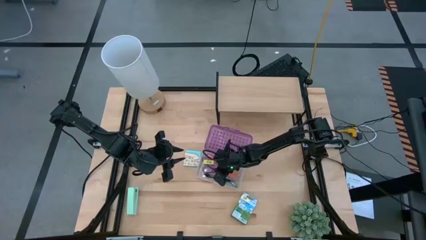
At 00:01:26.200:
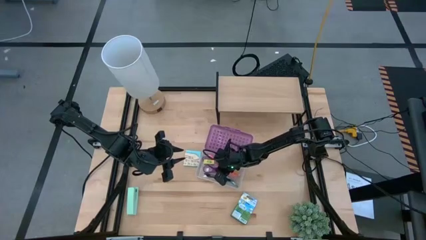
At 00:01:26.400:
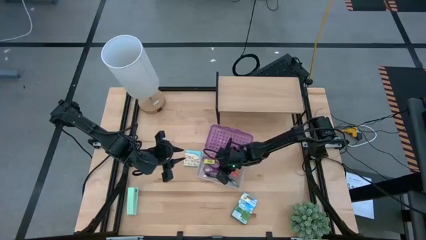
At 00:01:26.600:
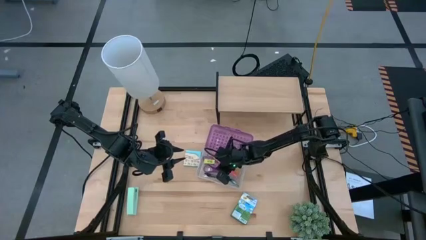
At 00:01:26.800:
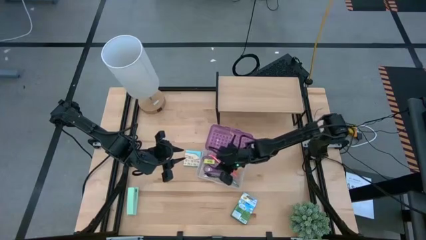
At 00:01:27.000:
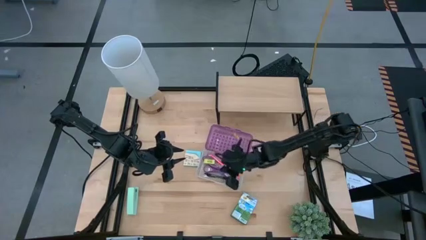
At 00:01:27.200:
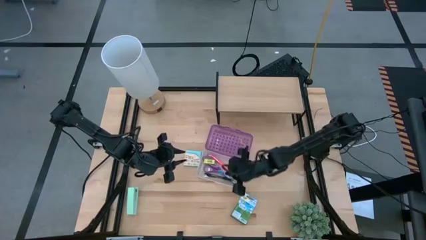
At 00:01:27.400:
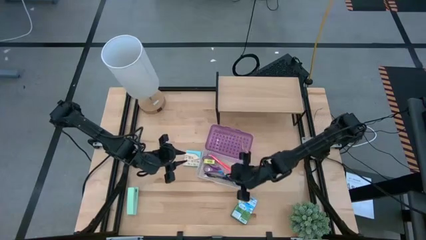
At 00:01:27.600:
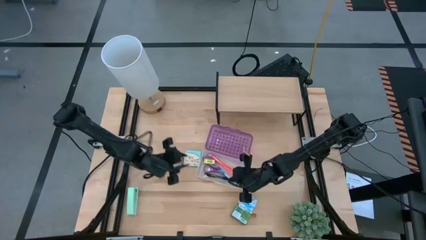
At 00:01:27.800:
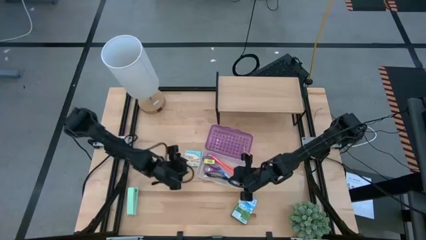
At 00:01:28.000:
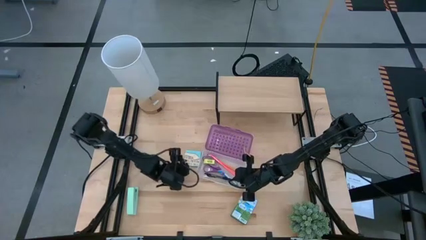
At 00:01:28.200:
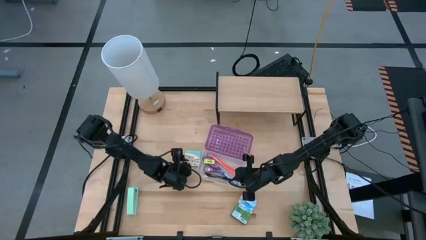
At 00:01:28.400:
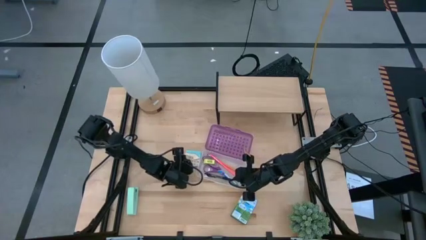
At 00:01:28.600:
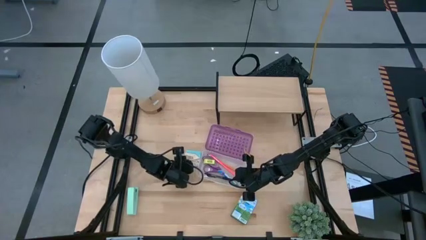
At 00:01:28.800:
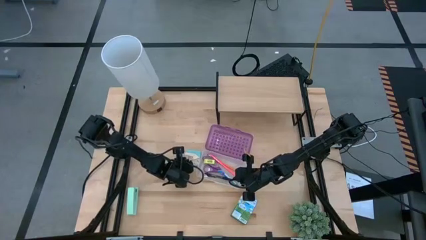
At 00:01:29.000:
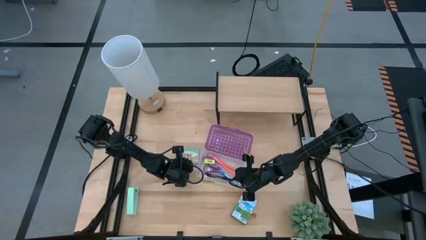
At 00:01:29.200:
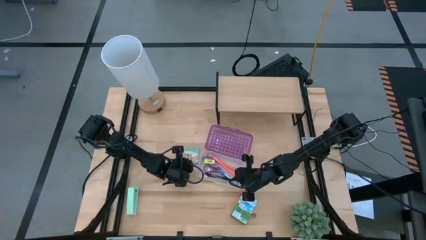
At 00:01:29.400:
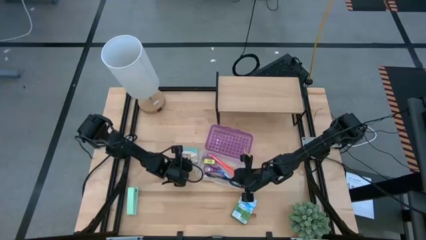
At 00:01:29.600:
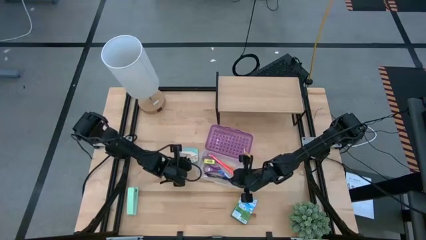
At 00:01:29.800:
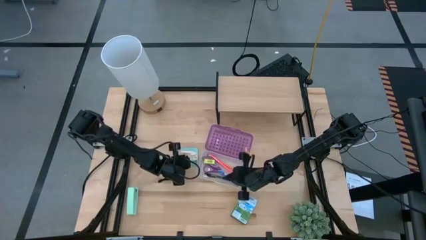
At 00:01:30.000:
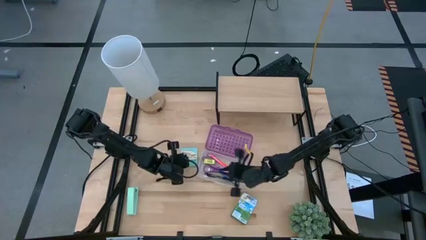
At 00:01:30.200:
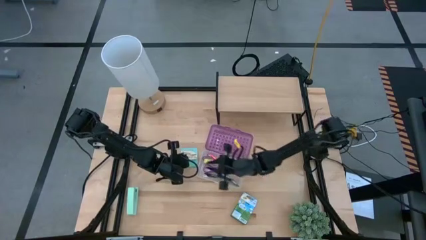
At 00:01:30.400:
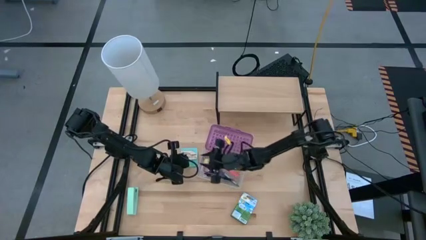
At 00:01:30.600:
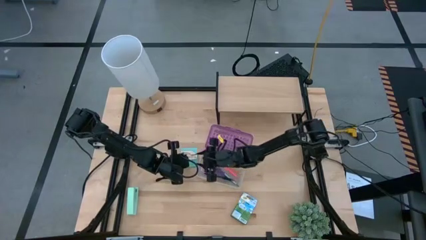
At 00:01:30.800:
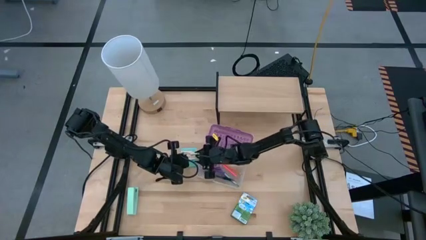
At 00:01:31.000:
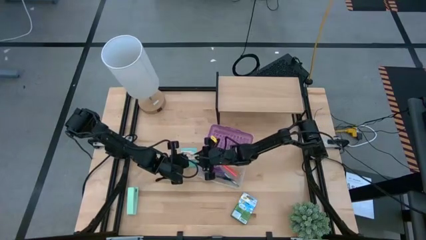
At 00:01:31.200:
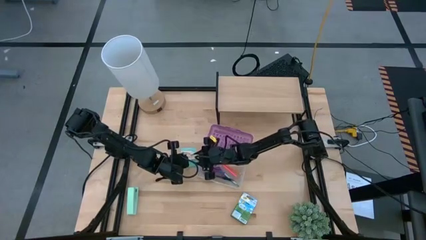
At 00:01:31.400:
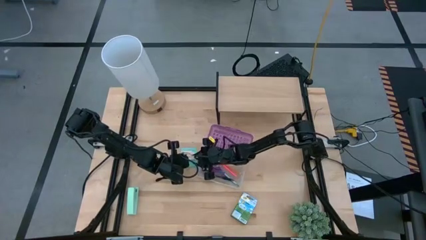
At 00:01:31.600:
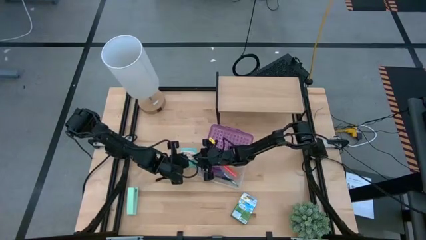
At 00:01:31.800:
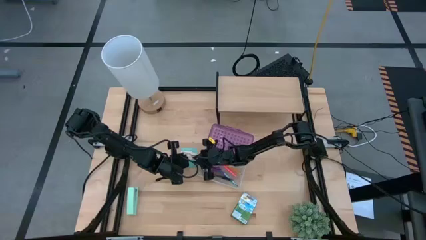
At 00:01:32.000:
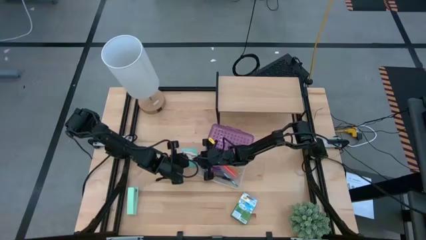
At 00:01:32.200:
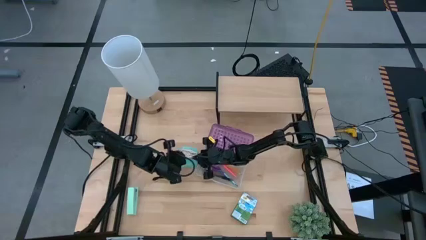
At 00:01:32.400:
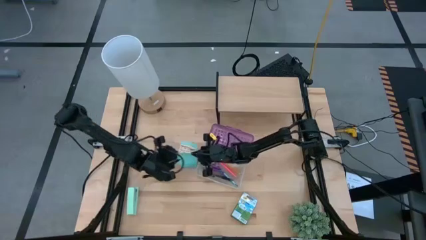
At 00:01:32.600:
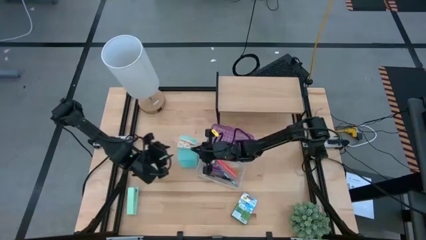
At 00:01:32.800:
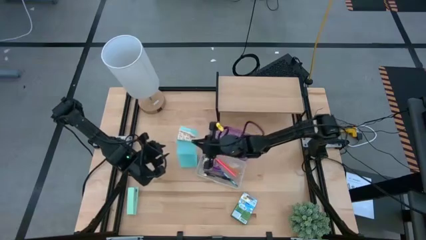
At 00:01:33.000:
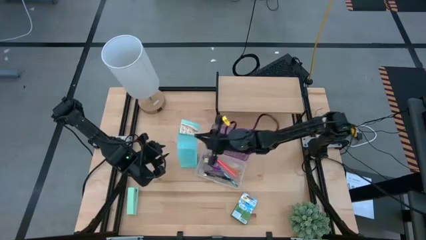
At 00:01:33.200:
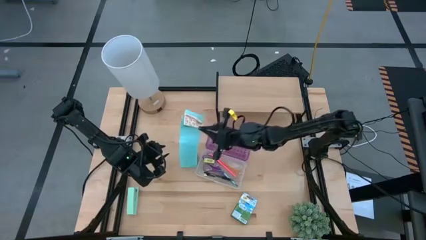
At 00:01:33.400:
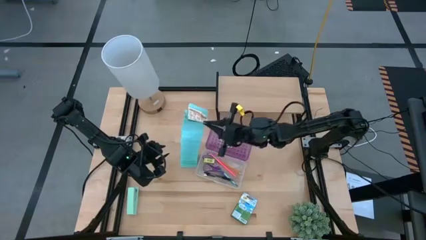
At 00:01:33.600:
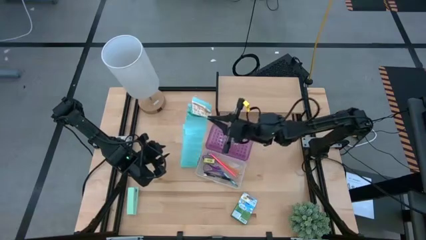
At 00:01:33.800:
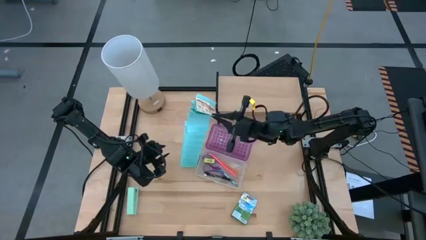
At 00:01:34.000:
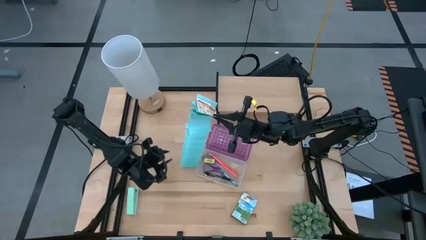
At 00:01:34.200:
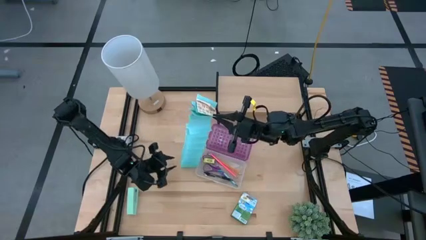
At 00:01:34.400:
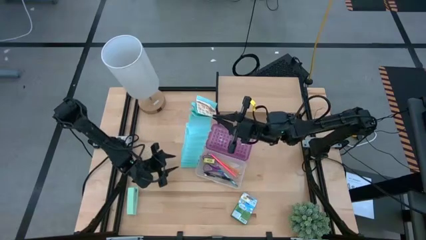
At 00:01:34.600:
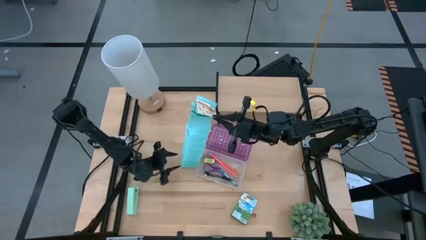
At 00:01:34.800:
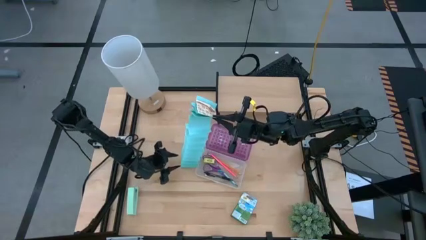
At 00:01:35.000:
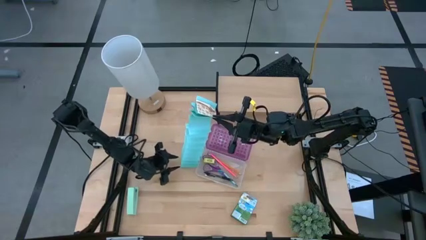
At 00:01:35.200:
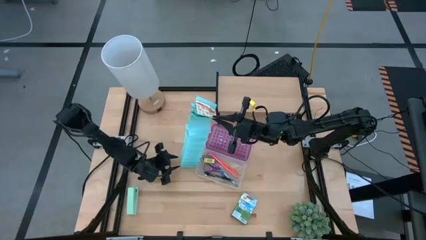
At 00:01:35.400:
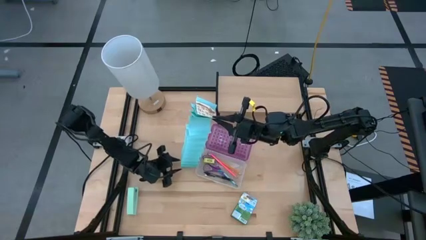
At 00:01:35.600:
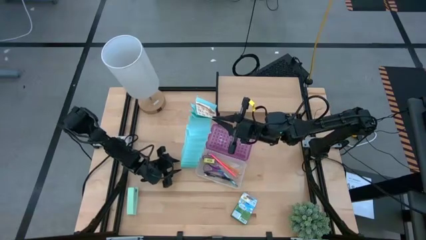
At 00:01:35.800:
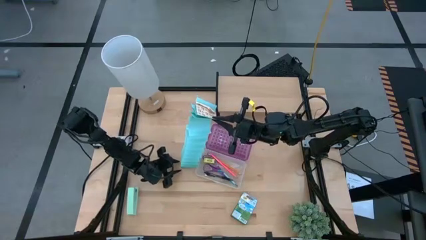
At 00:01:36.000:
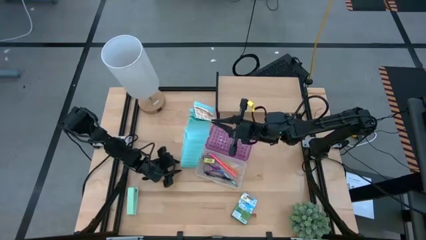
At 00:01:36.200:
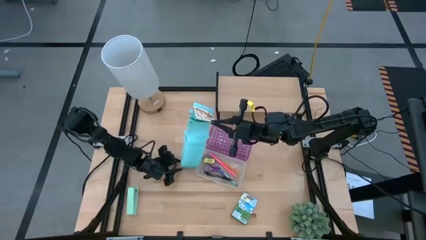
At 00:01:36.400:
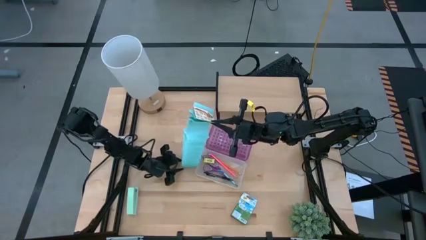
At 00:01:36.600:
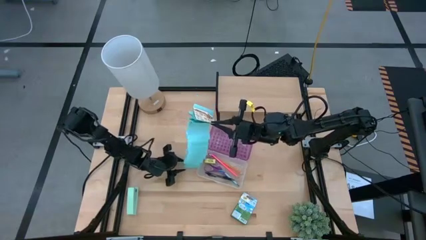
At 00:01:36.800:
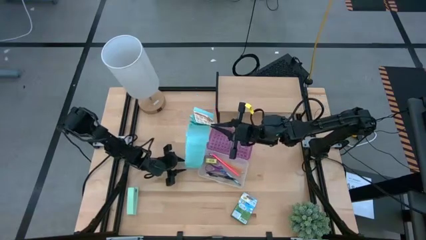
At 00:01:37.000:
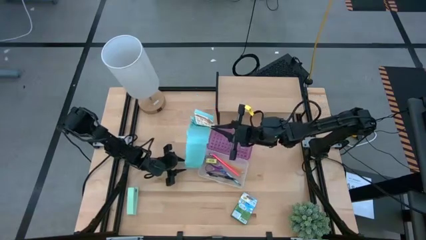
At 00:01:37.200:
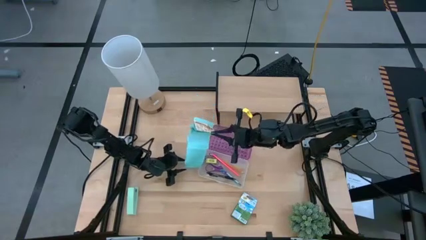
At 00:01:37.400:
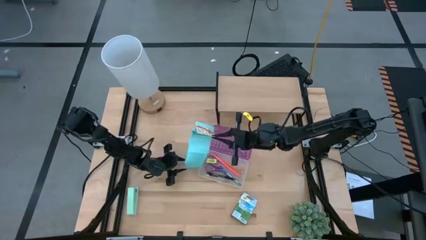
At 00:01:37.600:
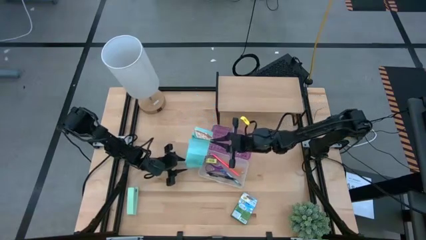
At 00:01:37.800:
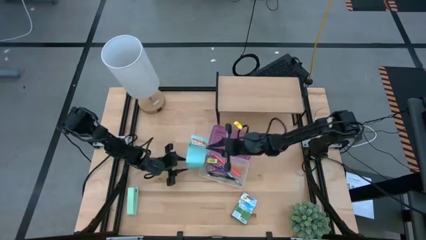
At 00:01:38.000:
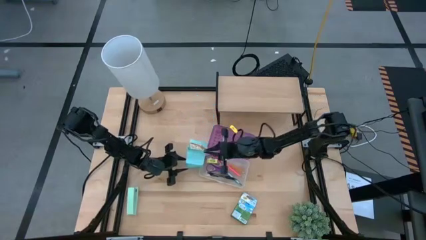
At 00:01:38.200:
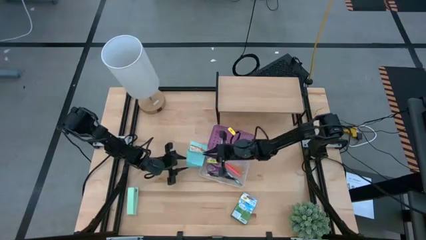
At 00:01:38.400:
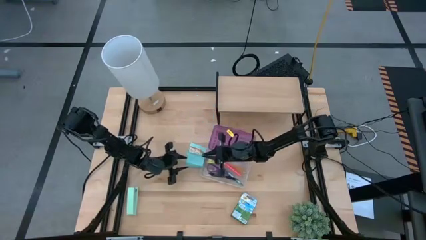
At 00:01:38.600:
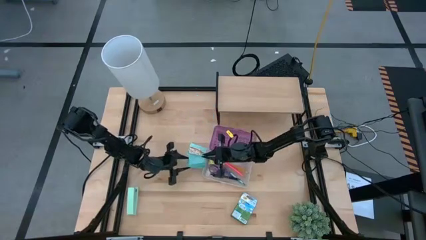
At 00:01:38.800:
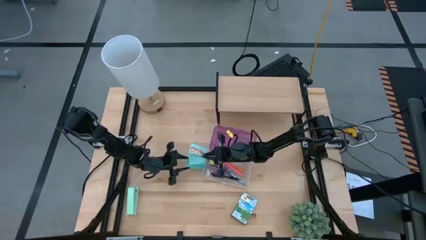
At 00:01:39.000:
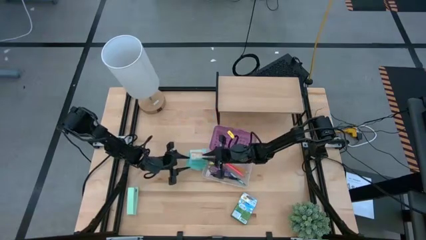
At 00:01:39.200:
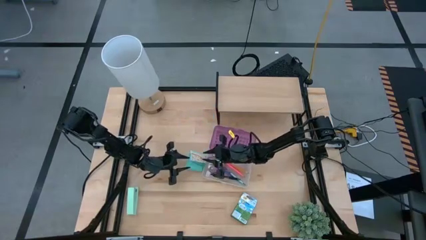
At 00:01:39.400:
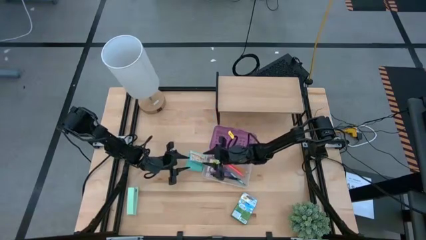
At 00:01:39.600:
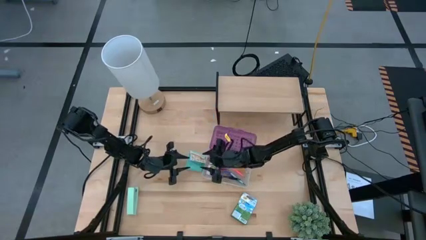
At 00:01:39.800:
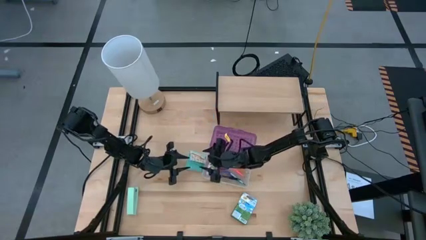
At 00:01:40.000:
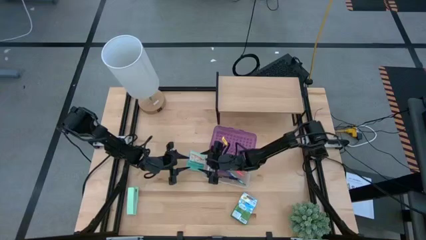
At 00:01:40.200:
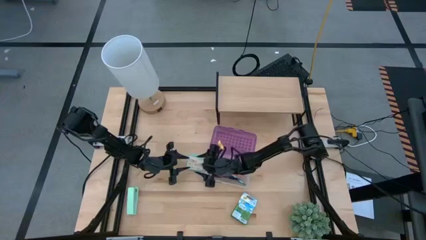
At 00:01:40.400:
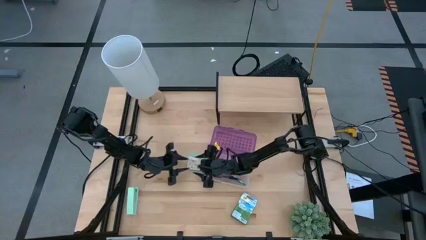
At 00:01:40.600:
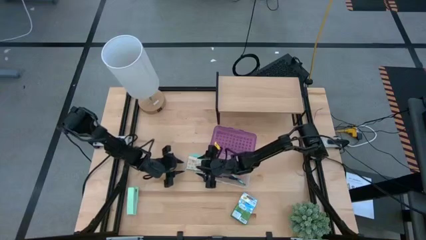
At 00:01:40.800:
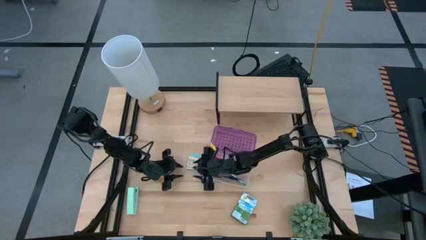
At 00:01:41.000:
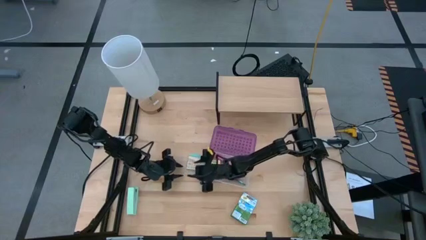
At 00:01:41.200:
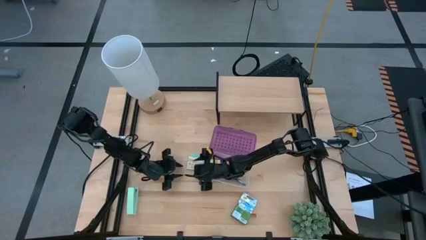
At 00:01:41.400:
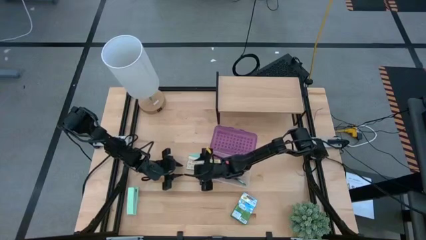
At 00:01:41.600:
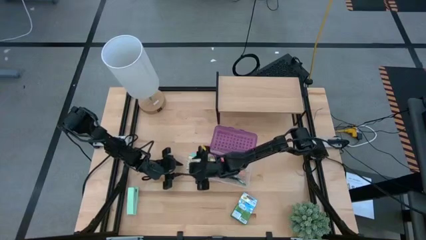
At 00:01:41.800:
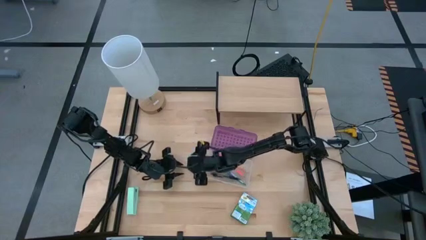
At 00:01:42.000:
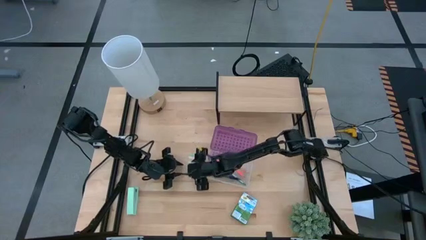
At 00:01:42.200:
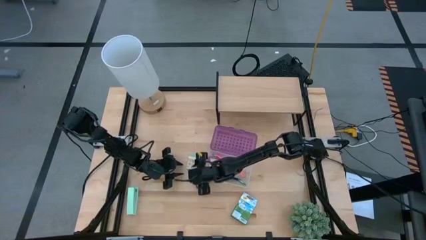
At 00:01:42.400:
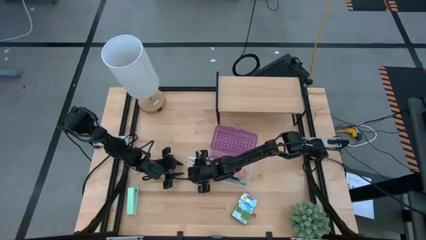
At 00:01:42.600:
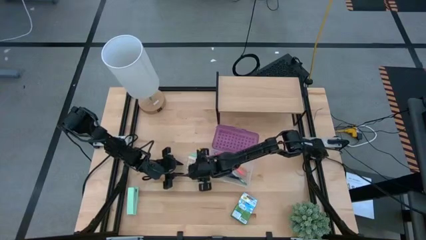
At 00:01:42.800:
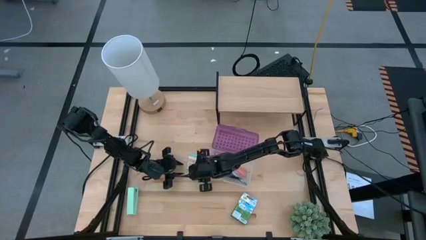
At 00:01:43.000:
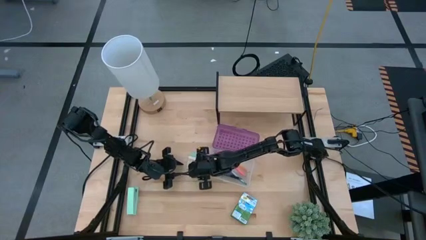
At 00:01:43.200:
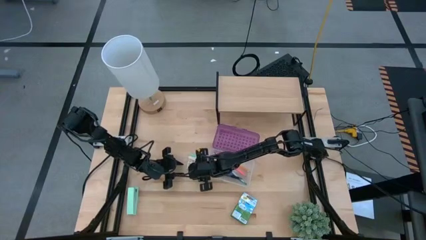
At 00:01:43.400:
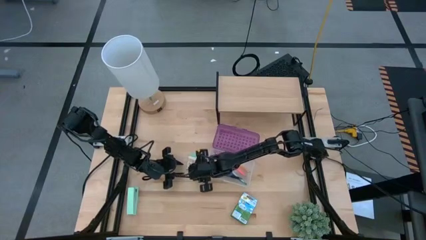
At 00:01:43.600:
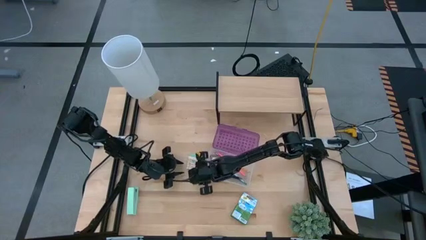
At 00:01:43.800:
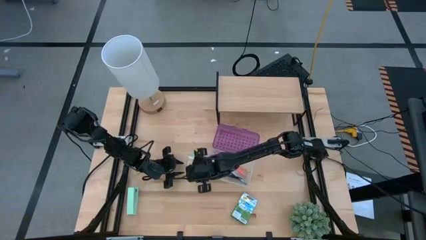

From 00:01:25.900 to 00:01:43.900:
Task: Pack school essentials
Put the blue sticky notes into the purple supply box
